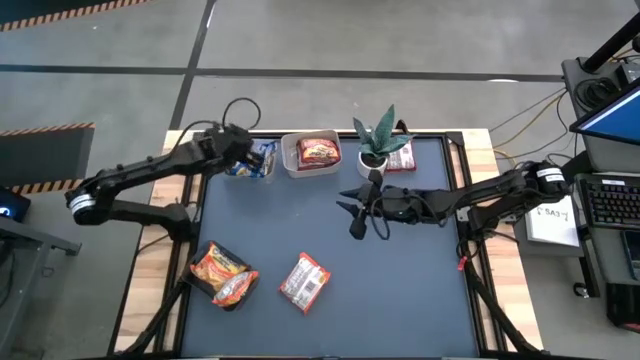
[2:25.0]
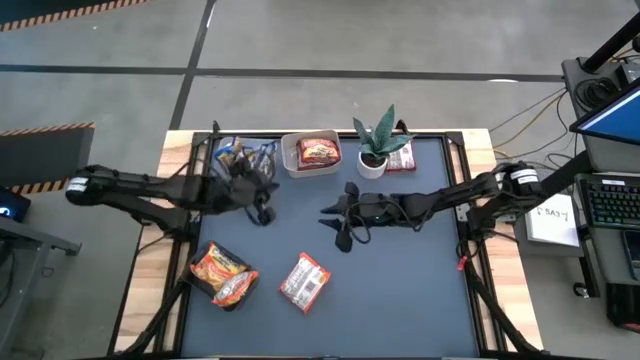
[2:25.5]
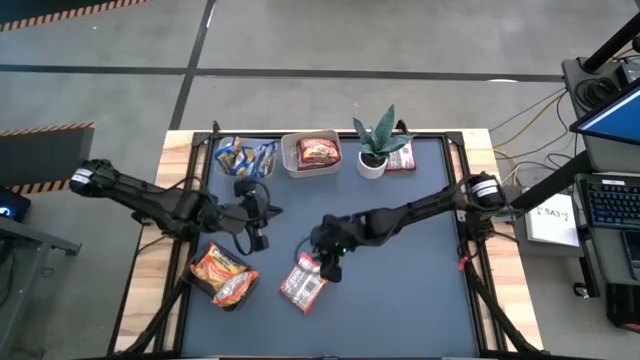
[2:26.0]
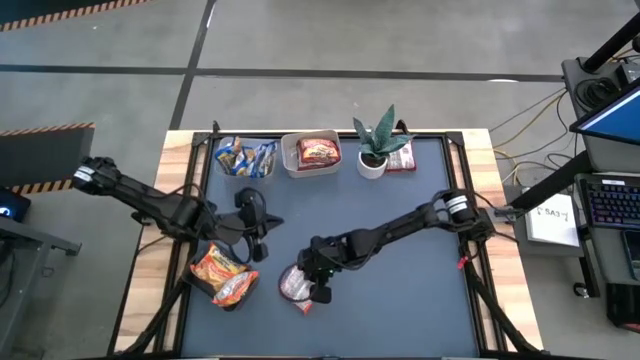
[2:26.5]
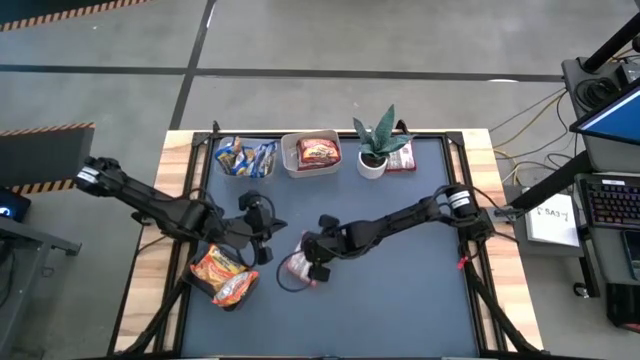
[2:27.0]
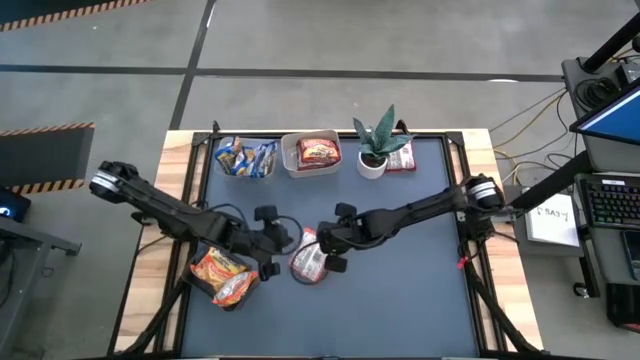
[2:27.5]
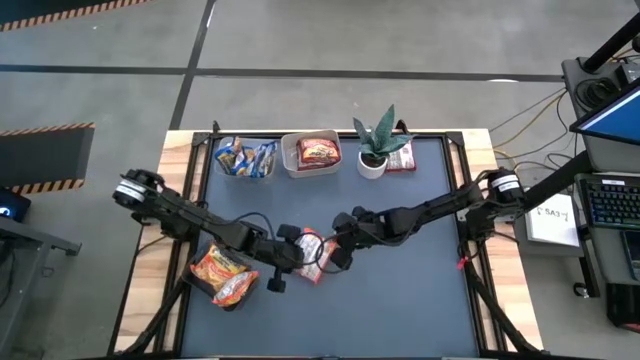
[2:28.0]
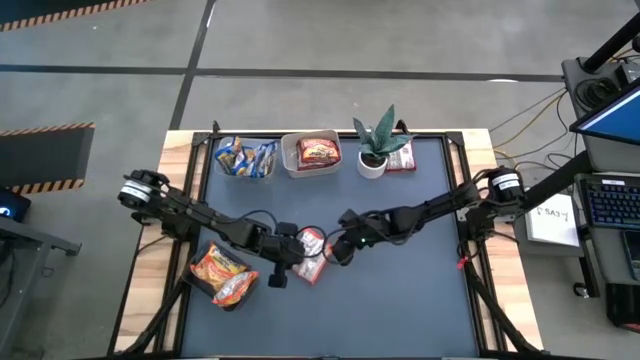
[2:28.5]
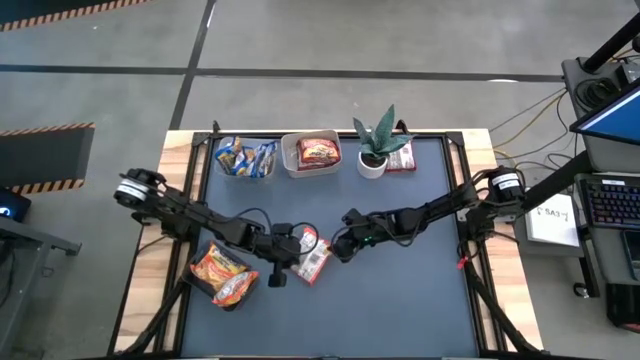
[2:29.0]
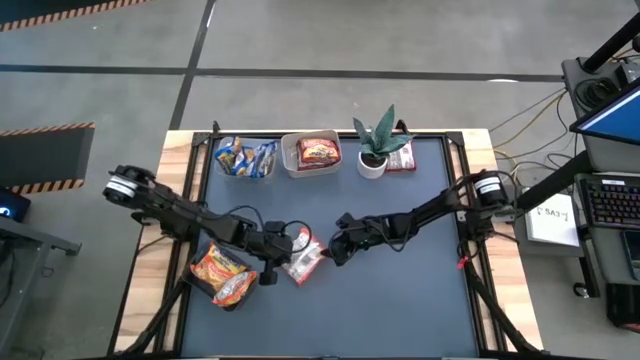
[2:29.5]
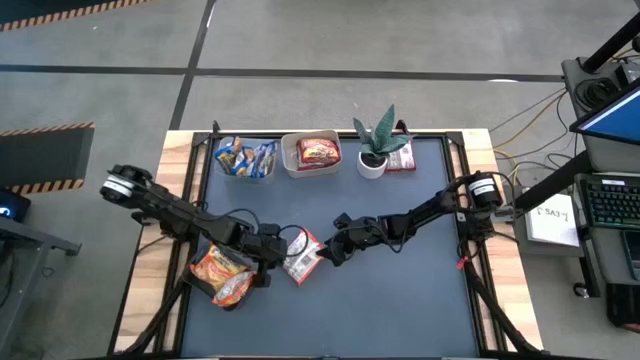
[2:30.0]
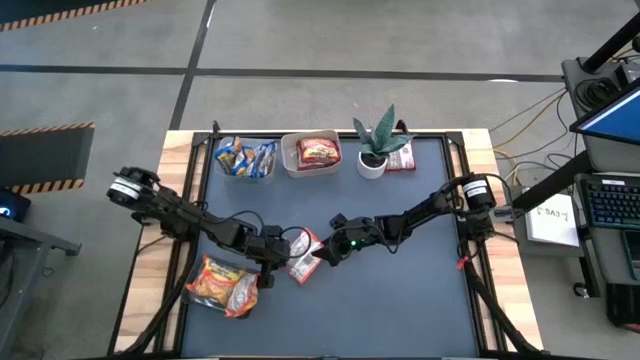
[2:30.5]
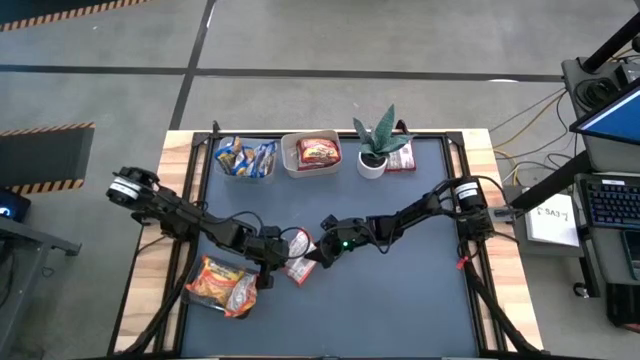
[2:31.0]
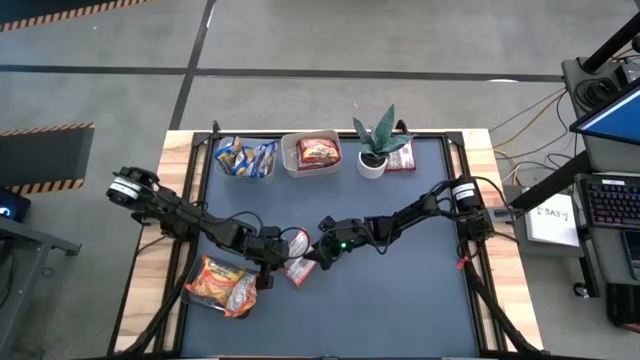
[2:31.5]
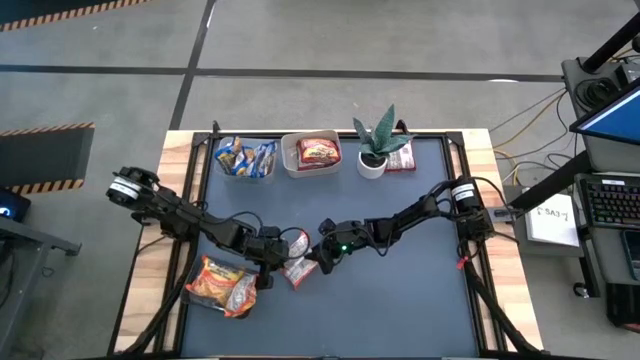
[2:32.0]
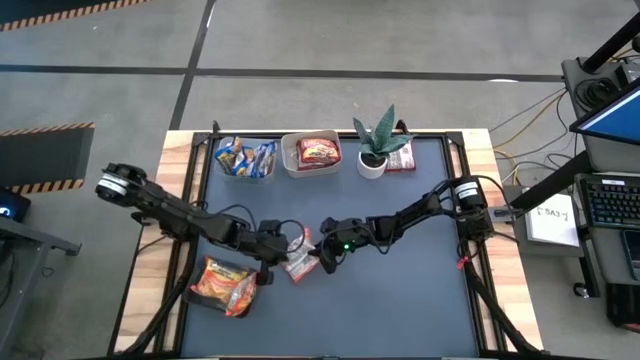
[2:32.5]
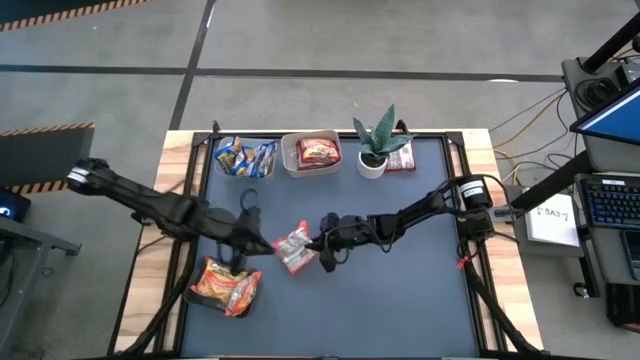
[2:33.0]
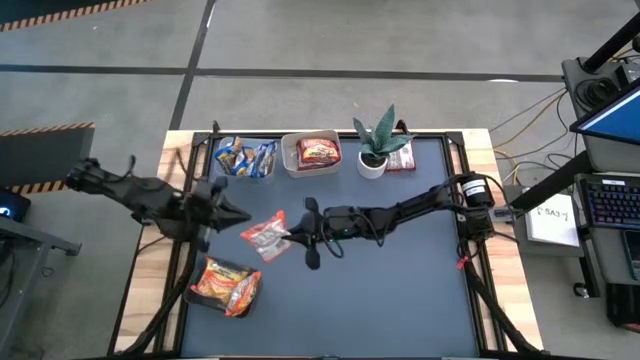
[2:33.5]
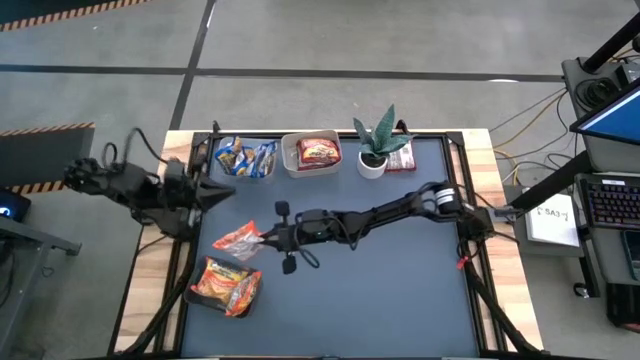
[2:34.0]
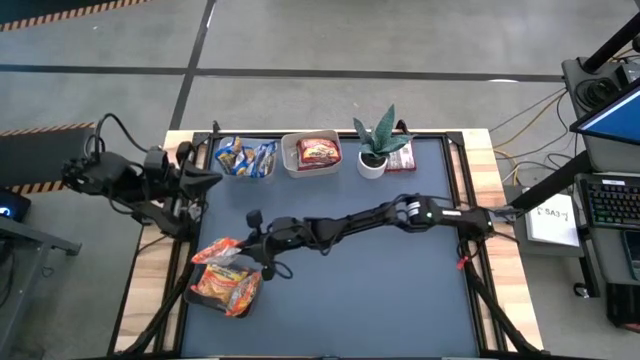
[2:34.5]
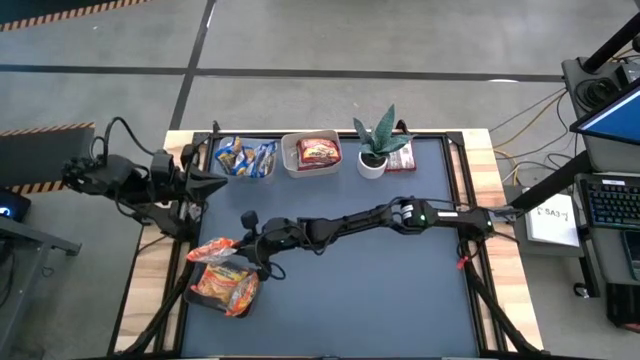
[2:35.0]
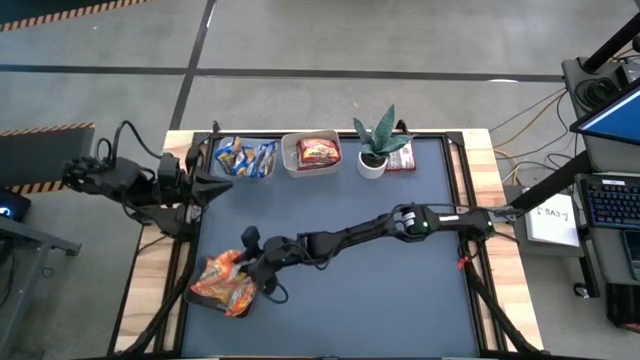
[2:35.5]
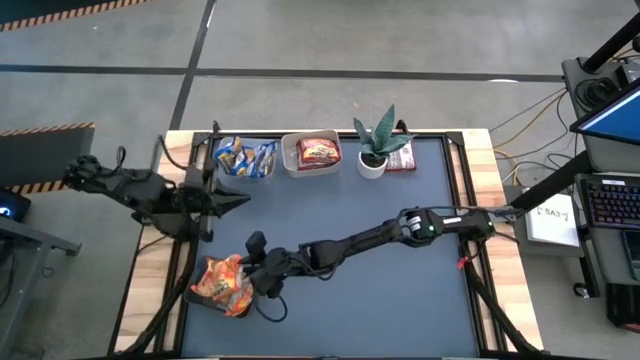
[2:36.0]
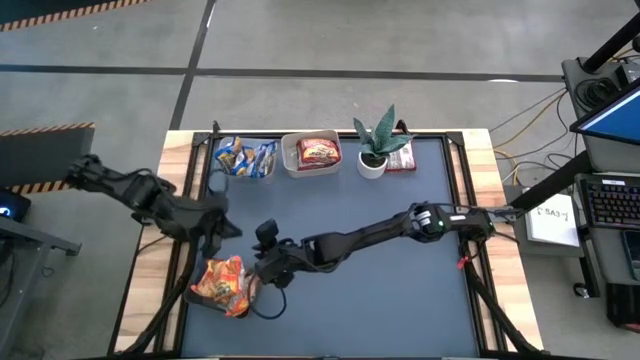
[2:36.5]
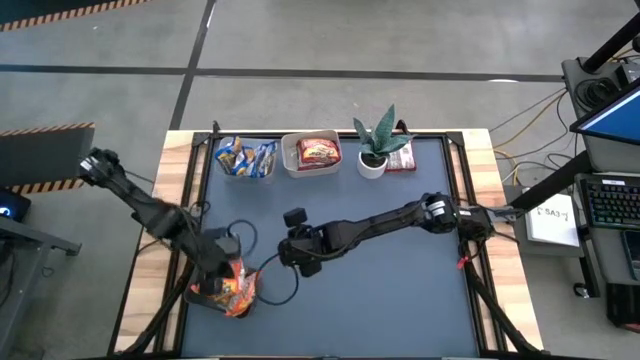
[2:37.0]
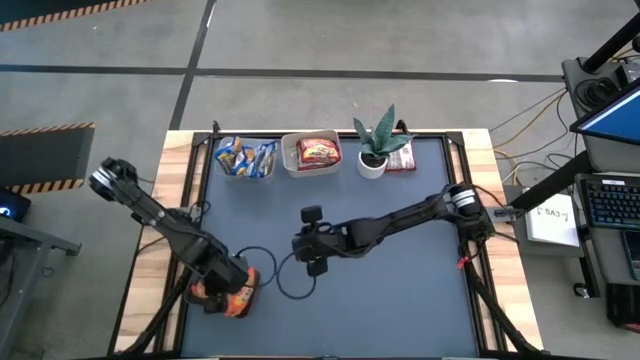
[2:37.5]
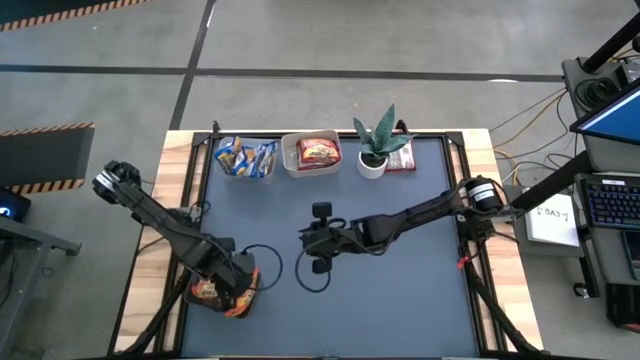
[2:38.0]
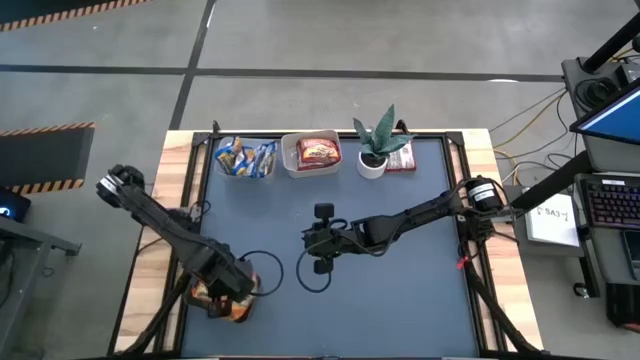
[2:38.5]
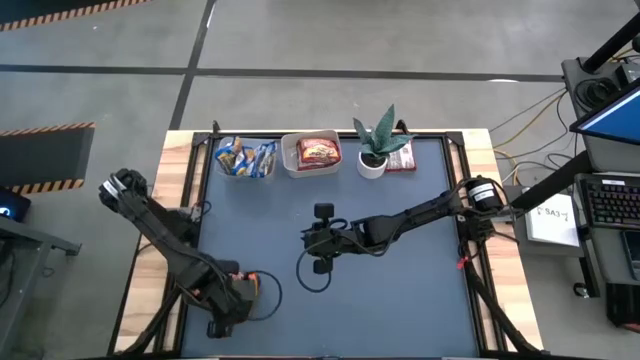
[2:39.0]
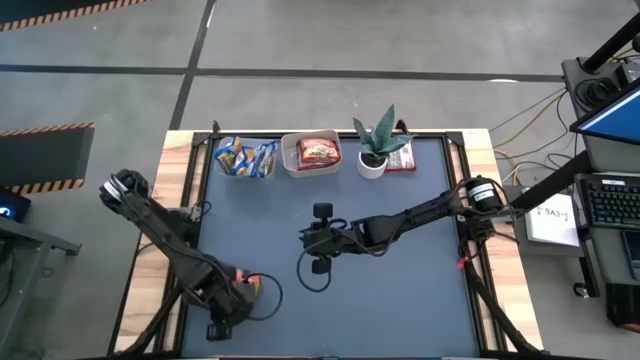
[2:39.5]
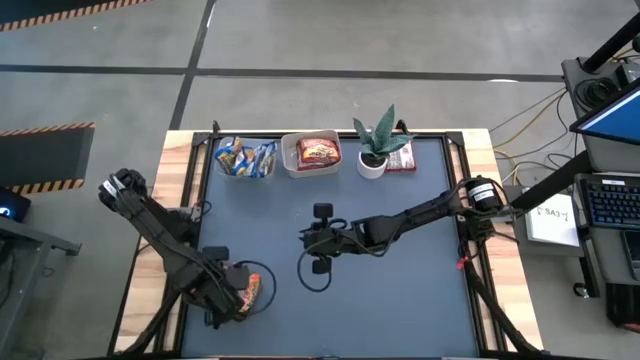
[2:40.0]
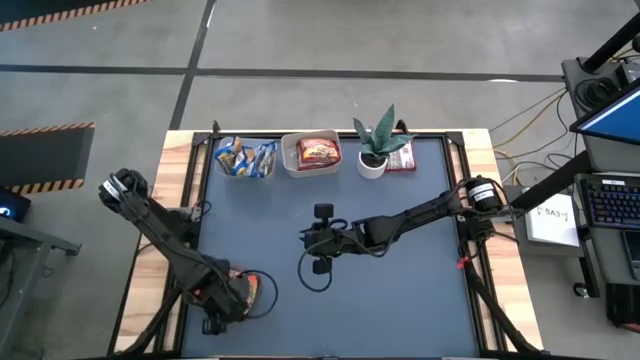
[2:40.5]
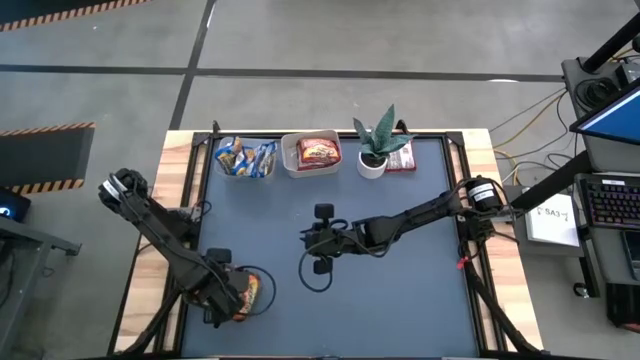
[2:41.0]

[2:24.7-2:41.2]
Task: Sort Maruchan noodles
Put the orange noodle pack into the black bin

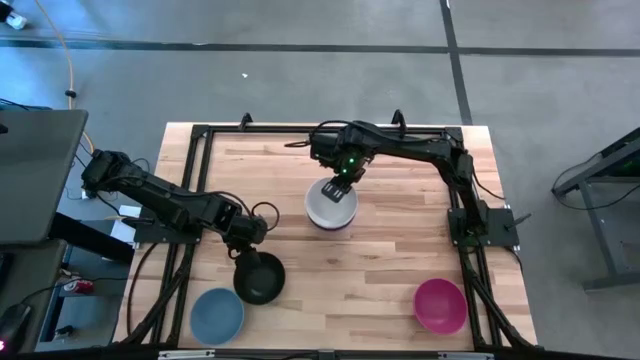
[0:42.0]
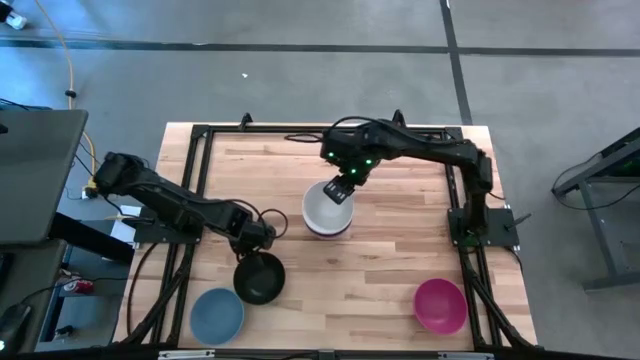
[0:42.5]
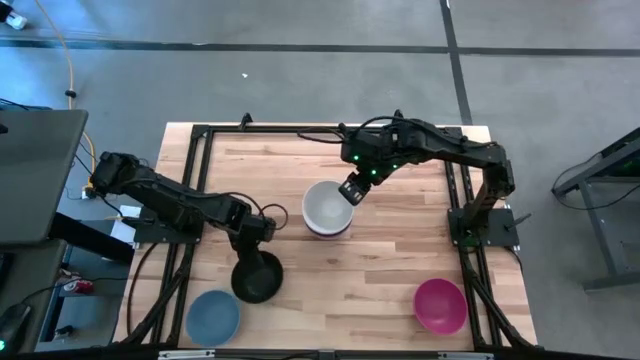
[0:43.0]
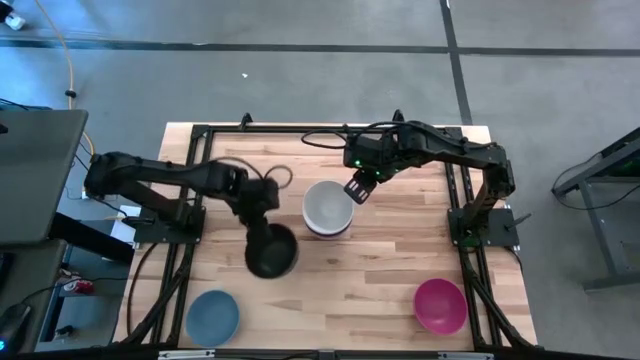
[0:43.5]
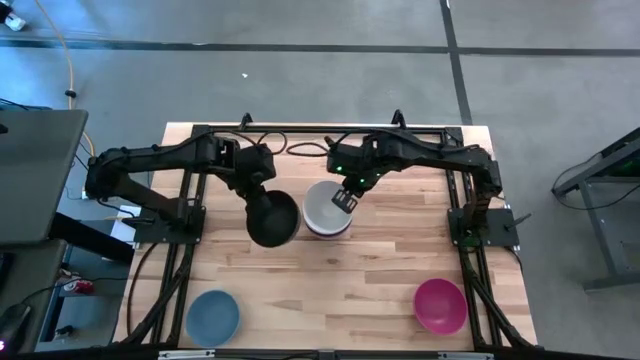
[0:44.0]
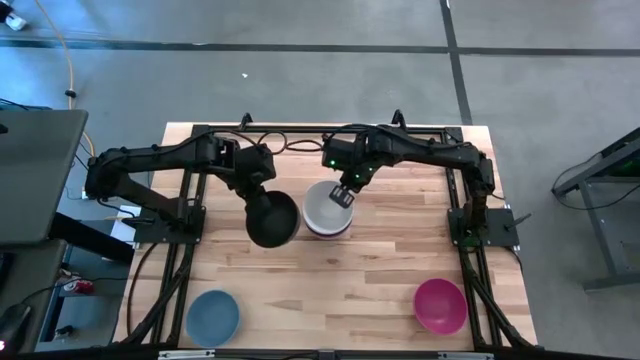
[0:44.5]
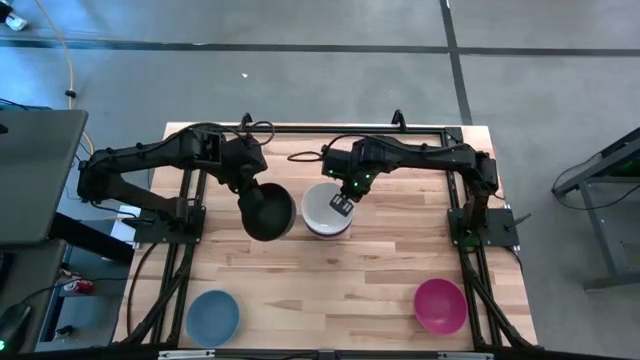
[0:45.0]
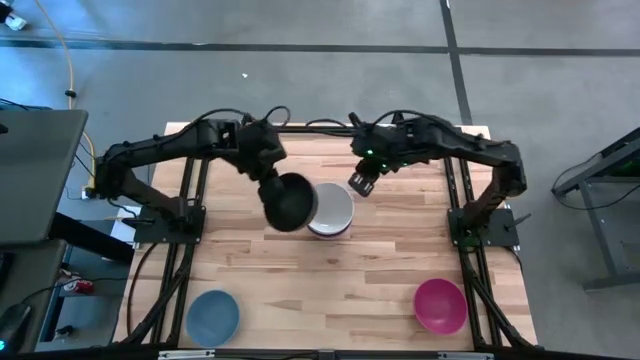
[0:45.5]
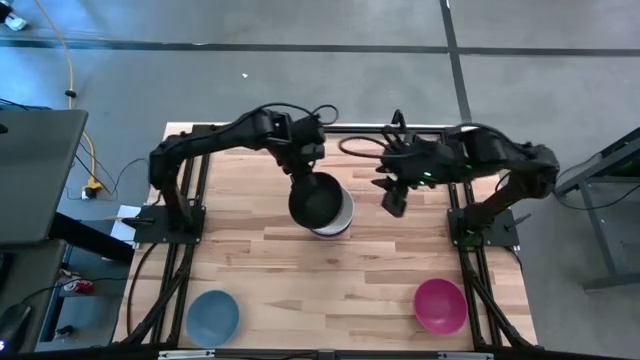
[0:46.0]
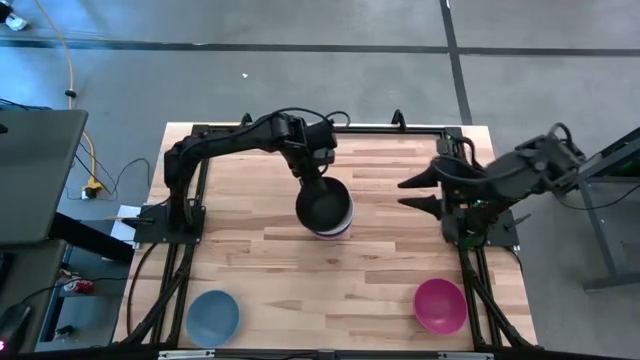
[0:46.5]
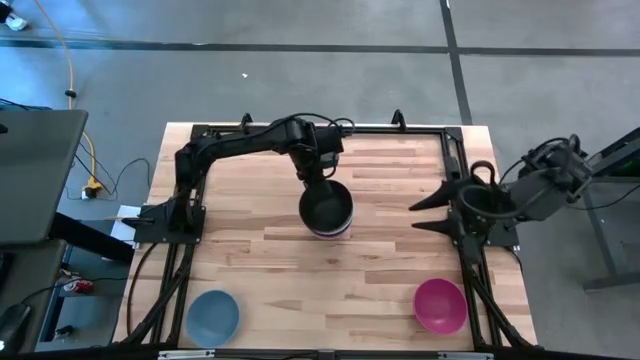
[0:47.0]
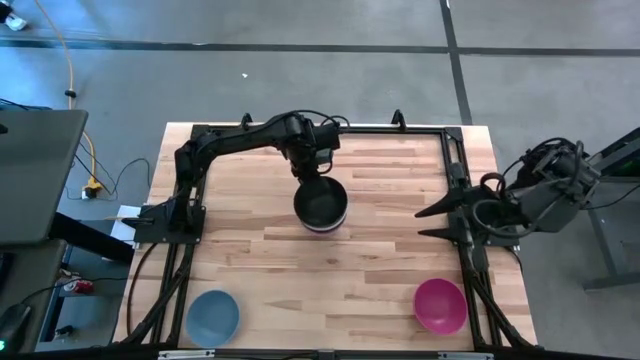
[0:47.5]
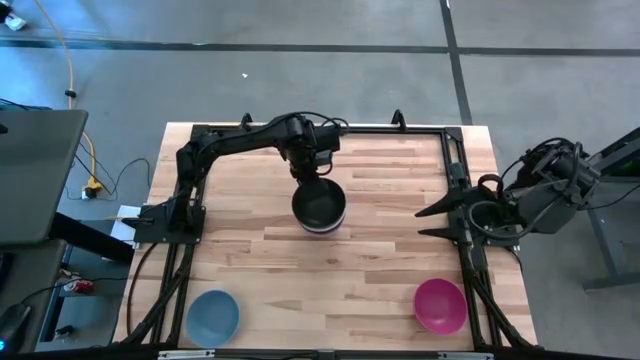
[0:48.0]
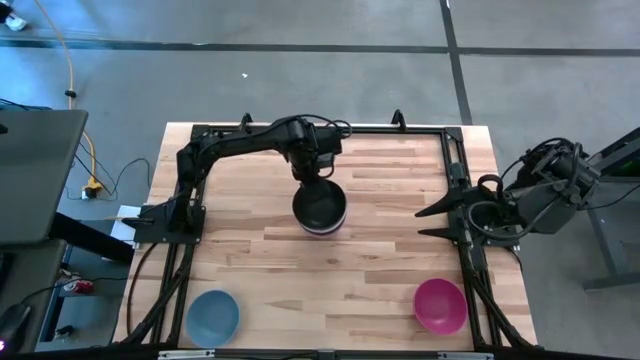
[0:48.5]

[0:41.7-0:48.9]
Task: Nest bowls inside each other
Stack the black bowl on top of the white bowl
